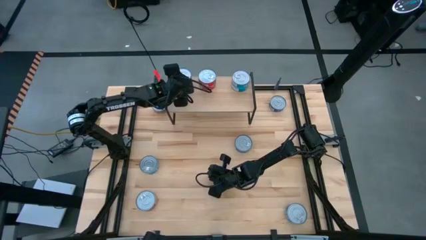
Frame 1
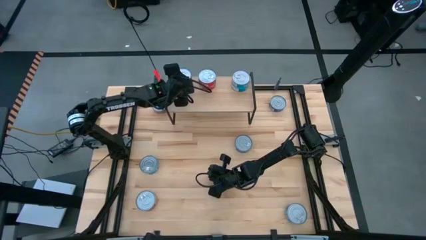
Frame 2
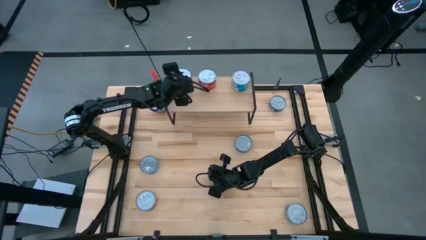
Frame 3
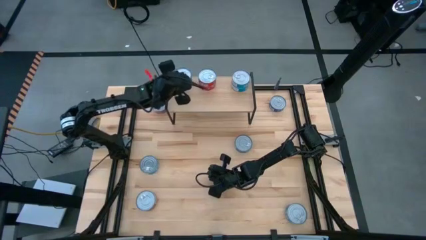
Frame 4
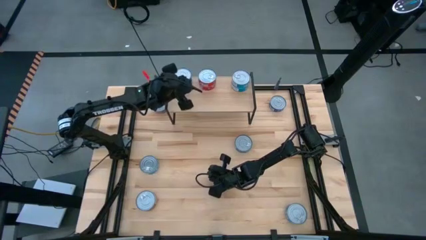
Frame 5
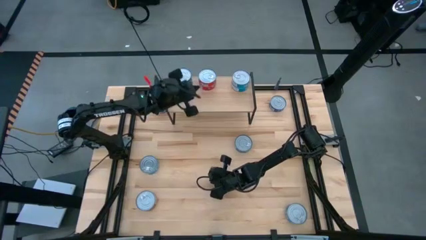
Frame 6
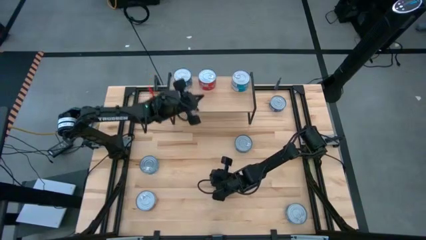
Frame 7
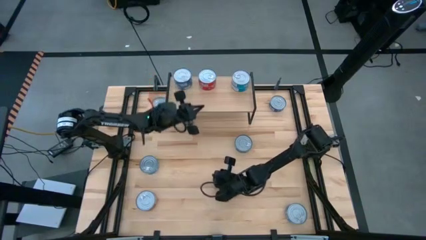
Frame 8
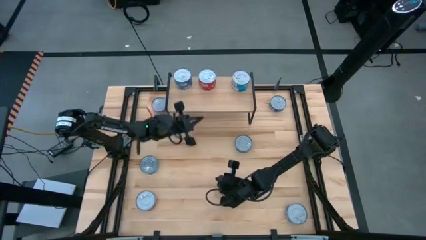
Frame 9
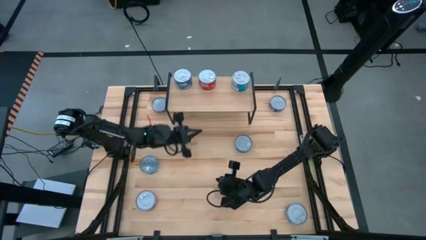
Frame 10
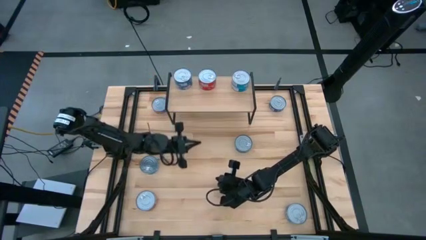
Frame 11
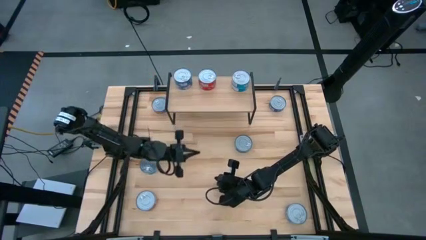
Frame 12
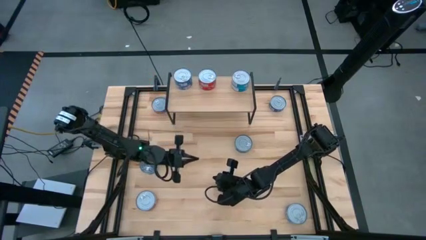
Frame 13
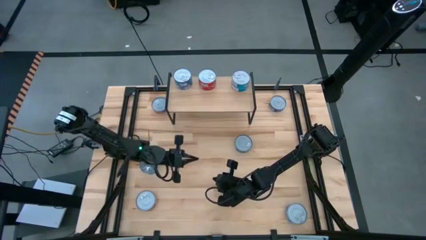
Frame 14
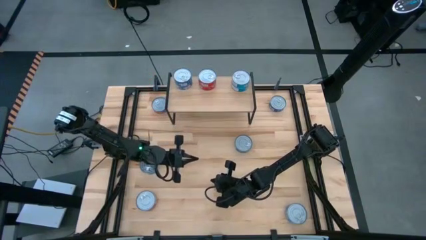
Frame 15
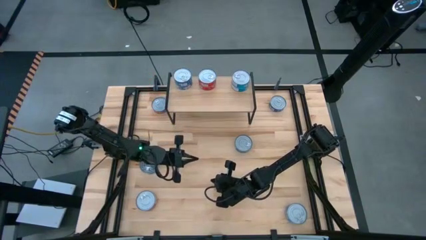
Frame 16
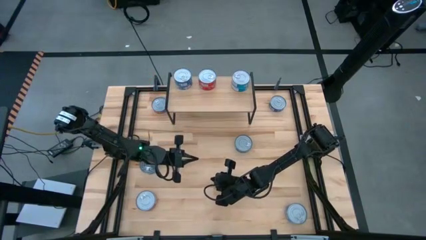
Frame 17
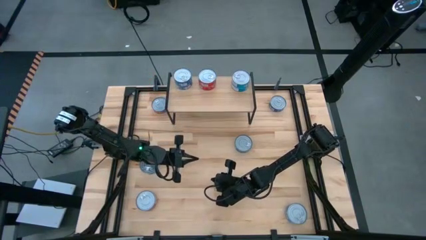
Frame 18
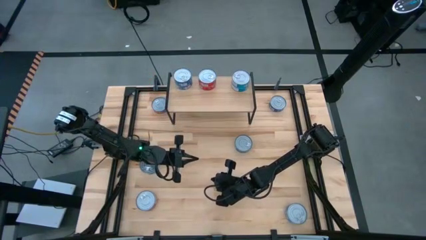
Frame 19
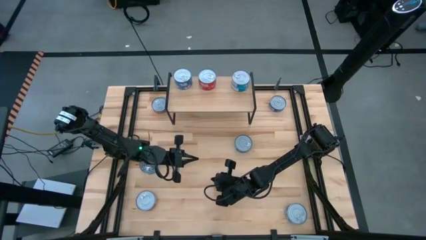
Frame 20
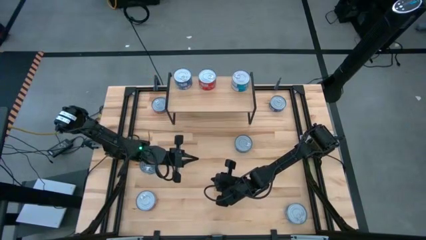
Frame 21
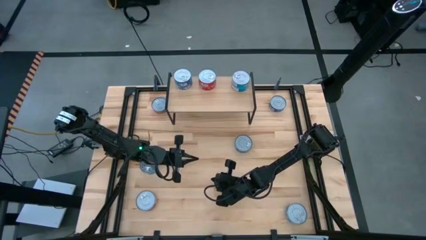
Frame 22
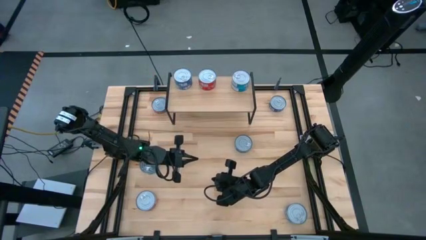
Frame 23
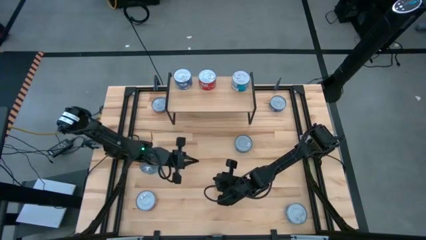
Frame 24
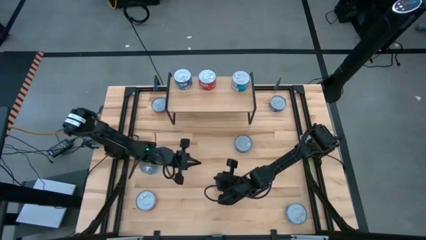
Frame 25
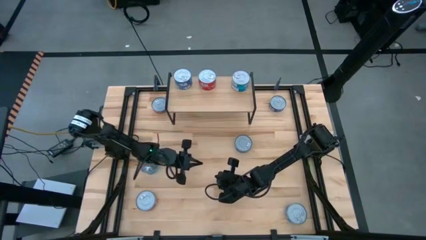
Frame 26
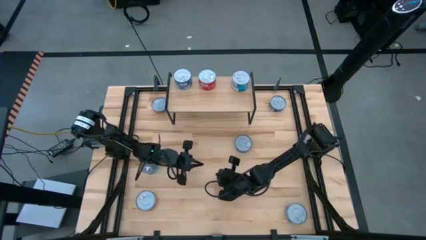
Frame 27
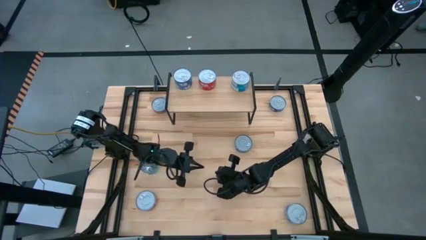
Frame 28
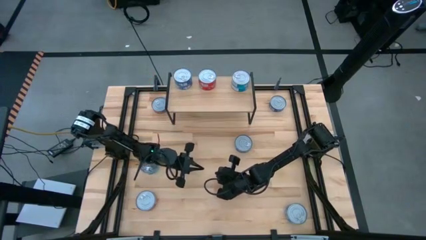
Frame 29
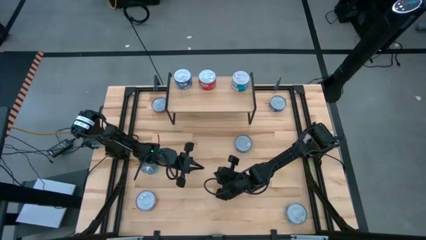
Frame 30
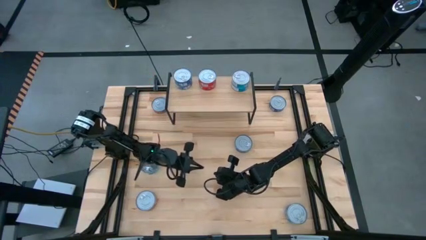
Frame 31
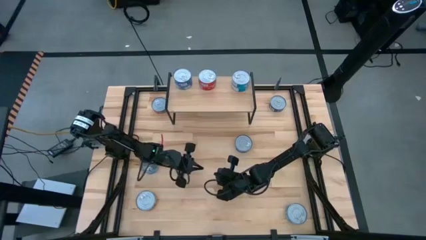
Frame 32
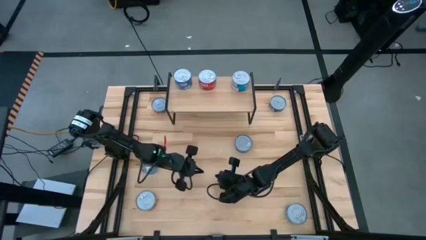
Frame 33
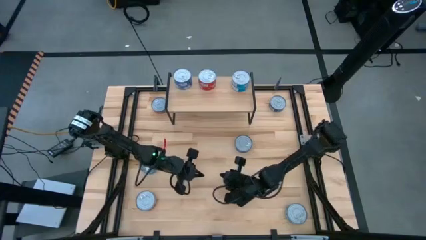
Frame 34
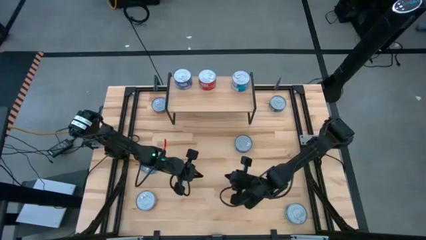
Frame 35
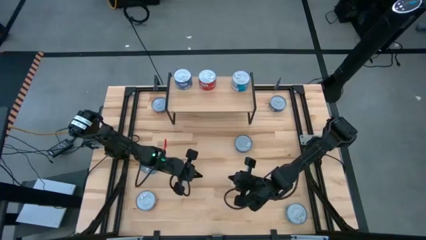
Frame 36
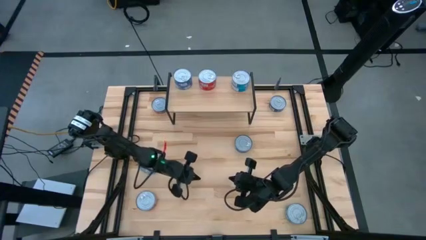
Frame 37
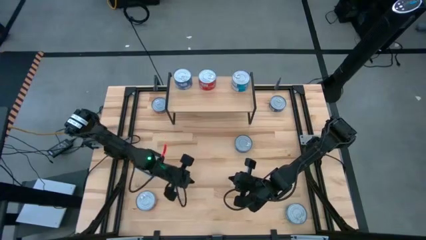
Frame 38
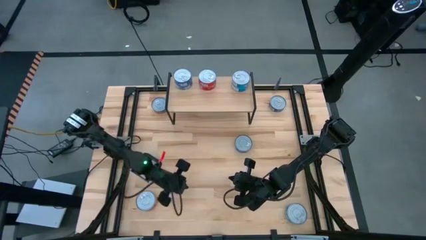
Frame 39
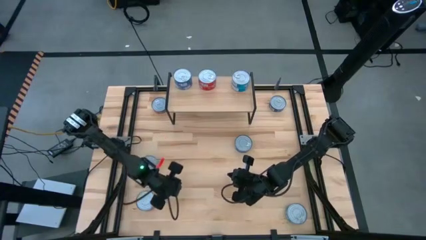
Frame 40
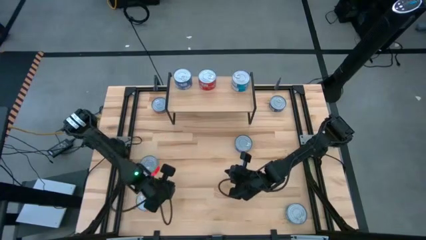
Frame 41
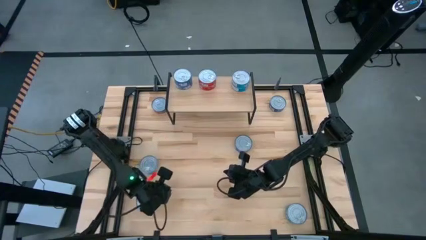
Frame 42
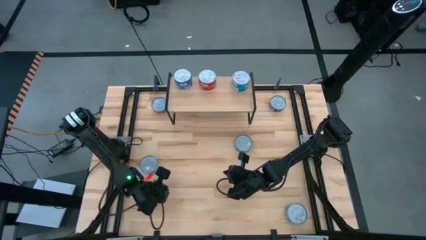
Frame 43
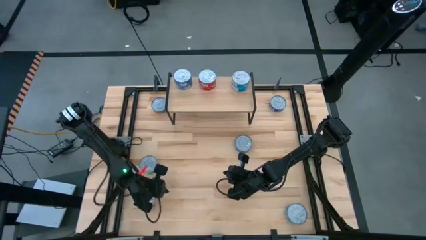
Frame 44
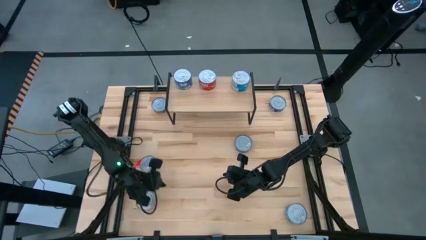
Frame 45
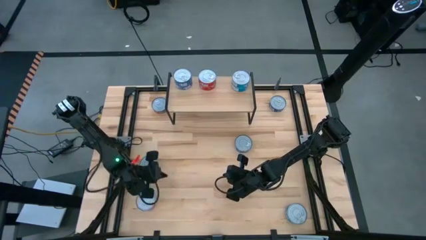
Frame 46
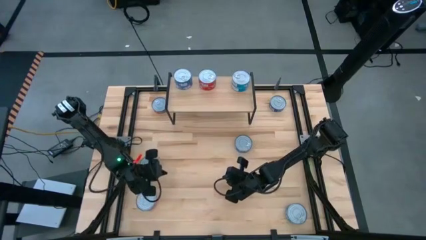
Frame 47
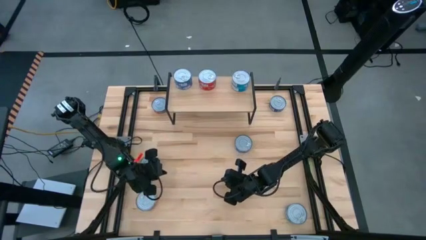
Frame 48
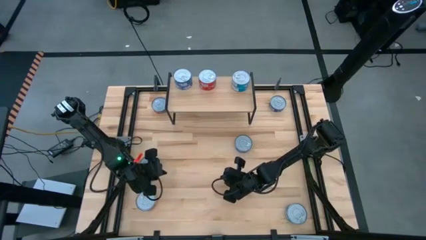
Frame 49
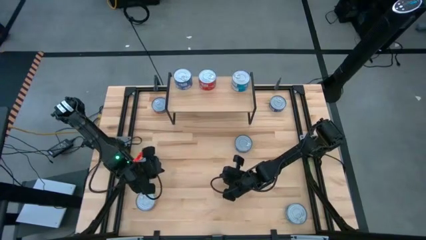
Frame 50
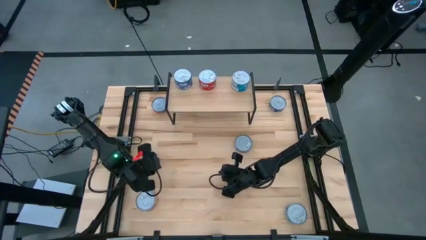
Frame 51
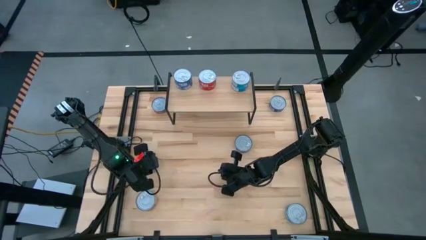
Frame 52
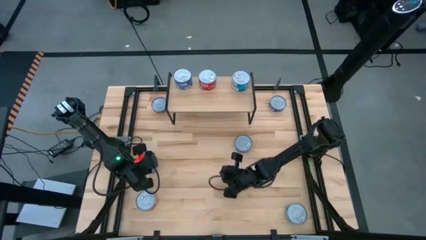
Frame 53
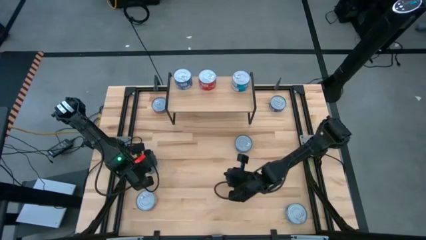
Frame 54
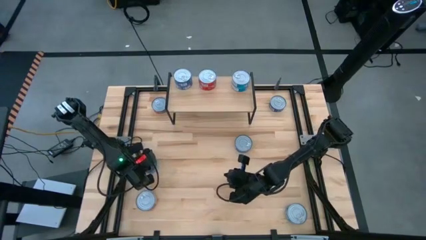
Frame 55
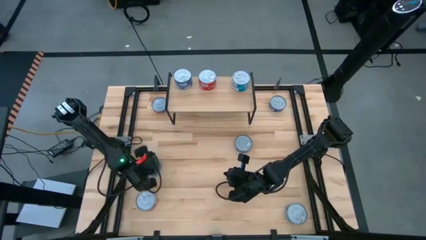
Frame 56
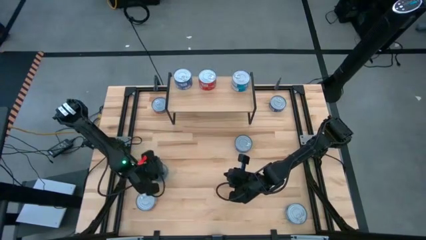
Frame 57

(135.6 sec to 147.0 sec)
Task: Stack canned seafood by type on shelf
Put the yellow blue tuna can on the shelf aligned with the other yellow blue tuna cans
